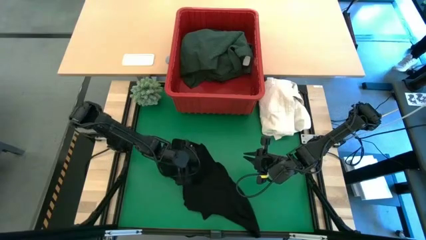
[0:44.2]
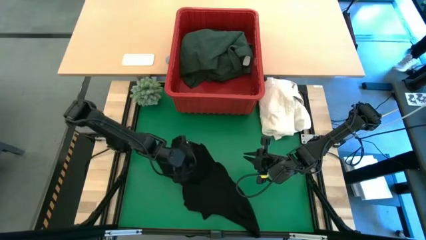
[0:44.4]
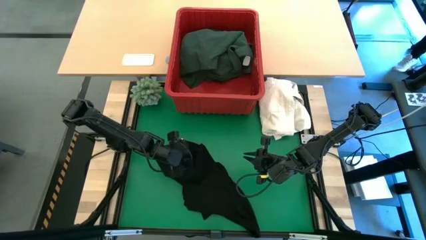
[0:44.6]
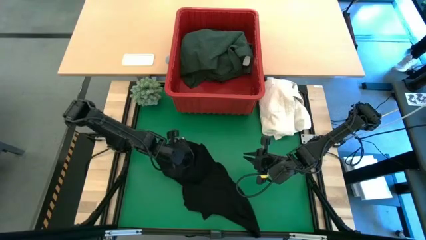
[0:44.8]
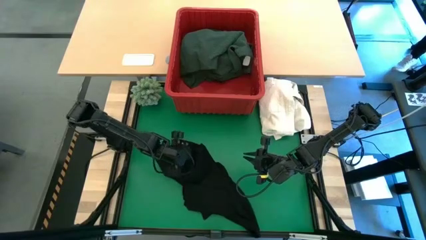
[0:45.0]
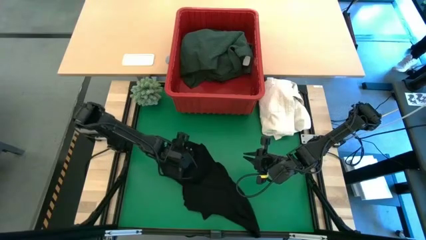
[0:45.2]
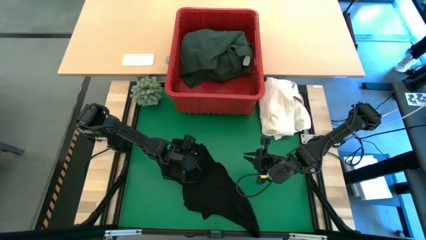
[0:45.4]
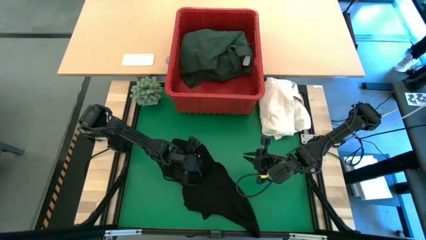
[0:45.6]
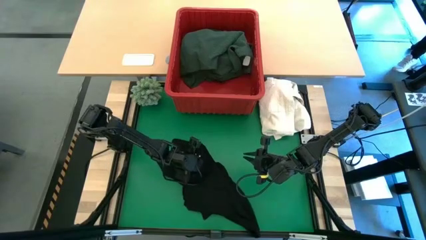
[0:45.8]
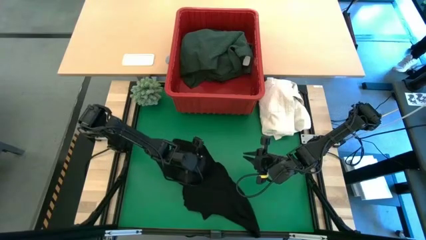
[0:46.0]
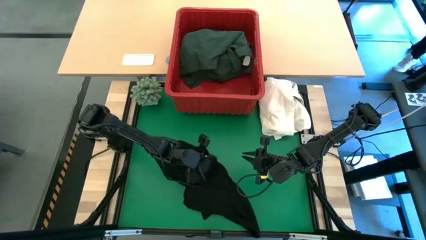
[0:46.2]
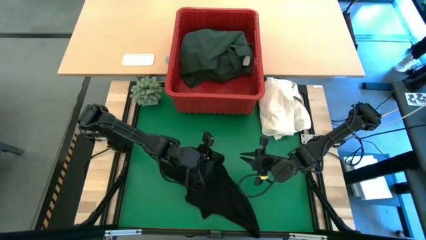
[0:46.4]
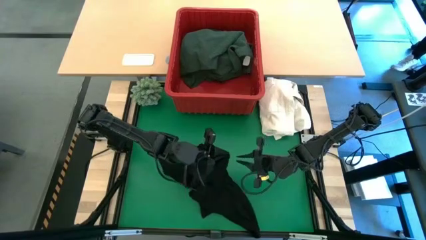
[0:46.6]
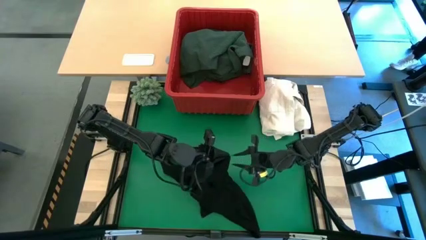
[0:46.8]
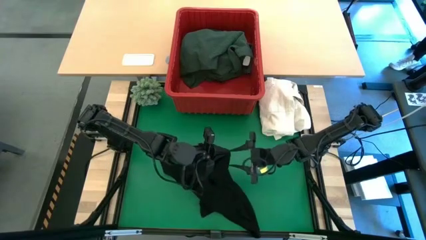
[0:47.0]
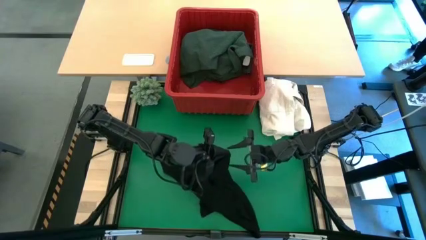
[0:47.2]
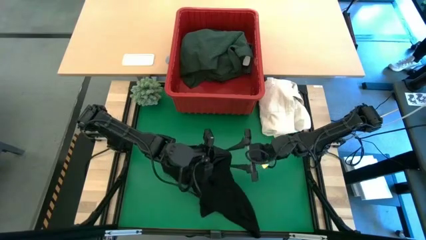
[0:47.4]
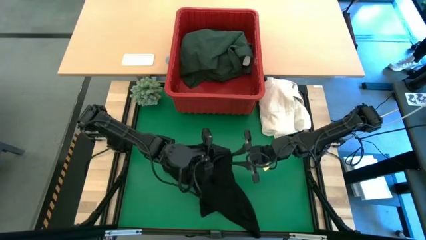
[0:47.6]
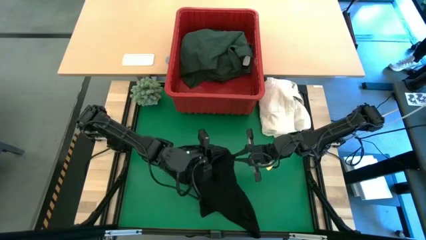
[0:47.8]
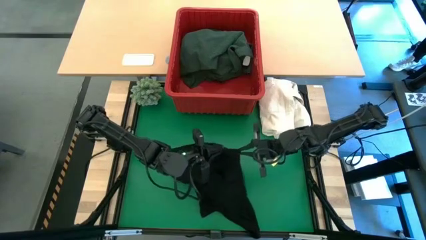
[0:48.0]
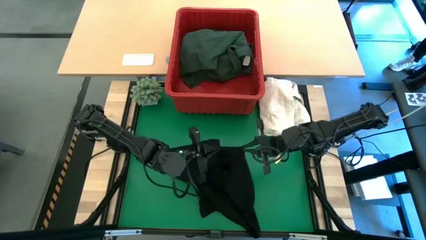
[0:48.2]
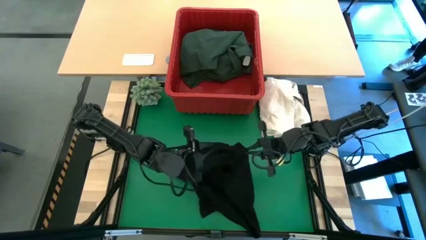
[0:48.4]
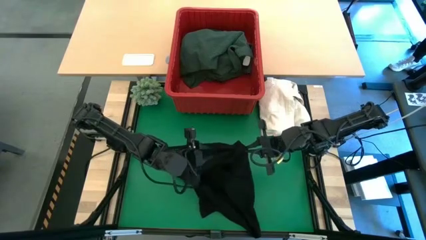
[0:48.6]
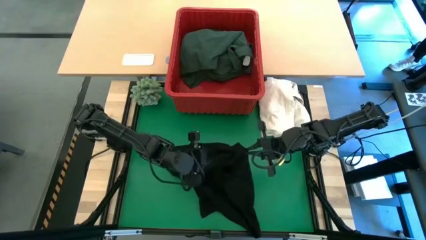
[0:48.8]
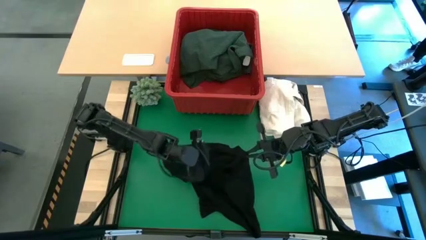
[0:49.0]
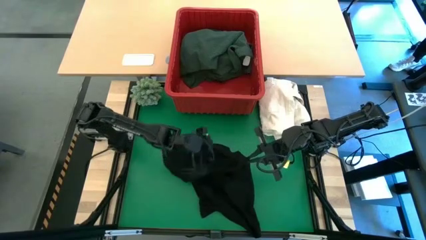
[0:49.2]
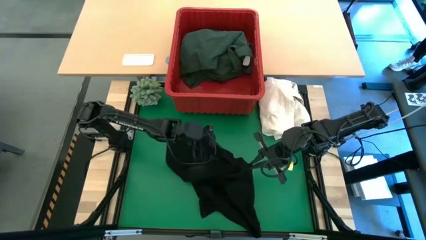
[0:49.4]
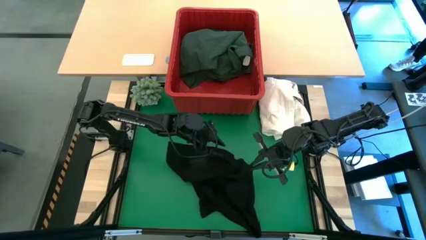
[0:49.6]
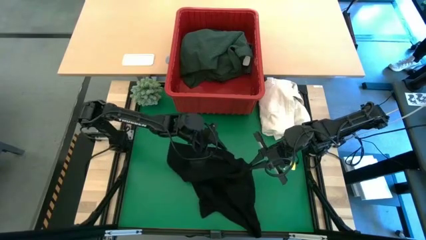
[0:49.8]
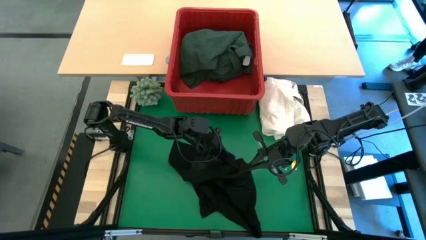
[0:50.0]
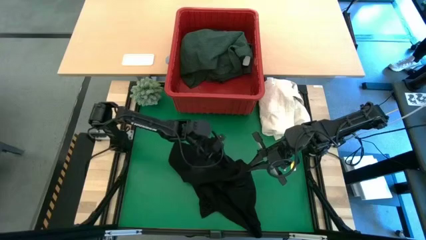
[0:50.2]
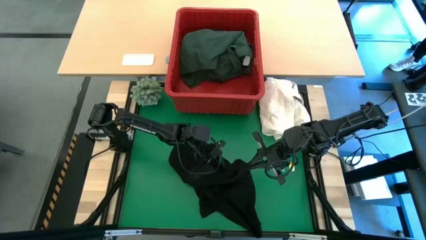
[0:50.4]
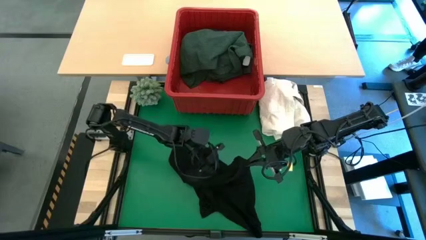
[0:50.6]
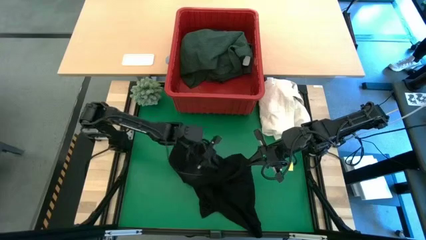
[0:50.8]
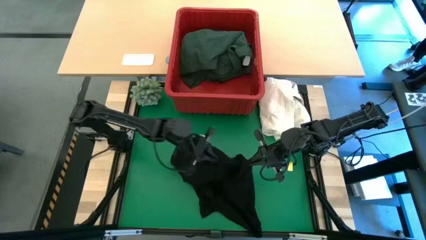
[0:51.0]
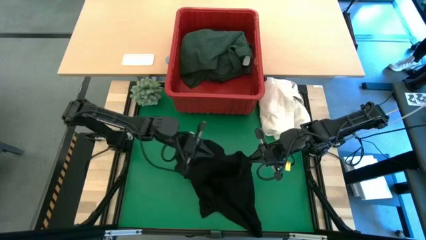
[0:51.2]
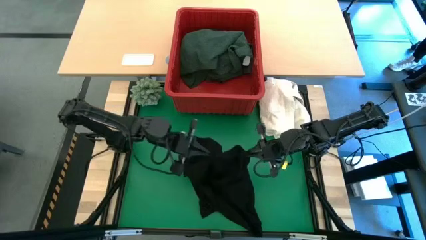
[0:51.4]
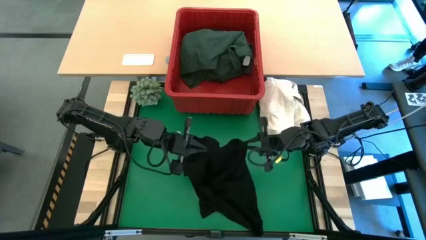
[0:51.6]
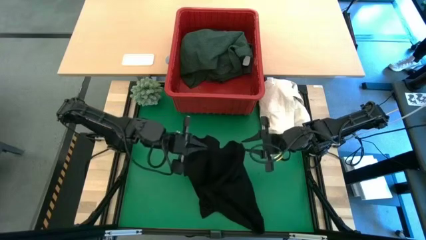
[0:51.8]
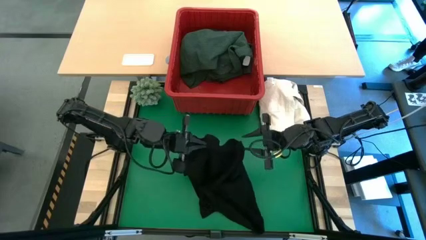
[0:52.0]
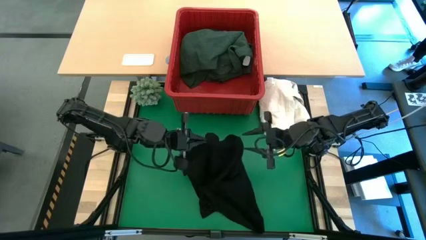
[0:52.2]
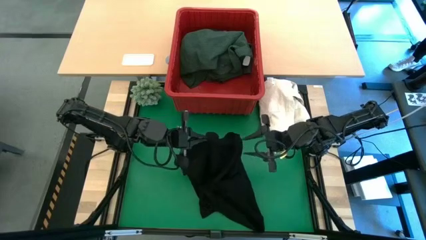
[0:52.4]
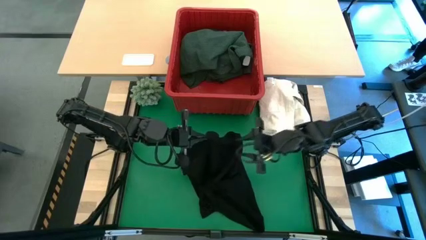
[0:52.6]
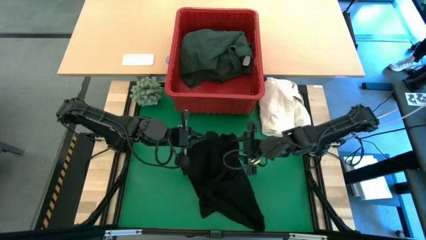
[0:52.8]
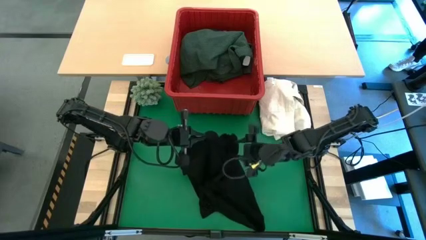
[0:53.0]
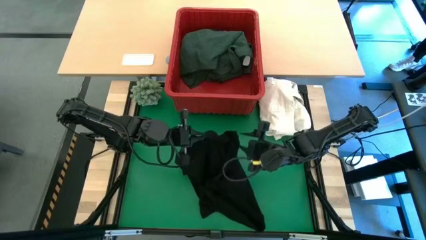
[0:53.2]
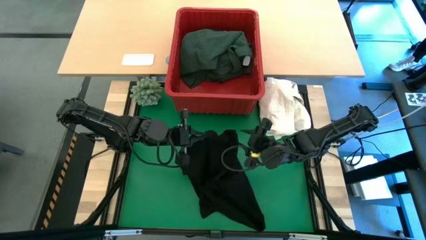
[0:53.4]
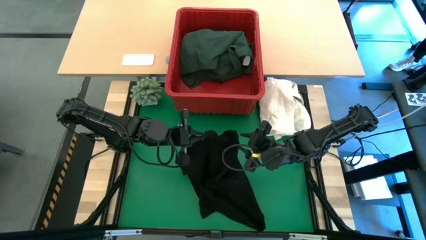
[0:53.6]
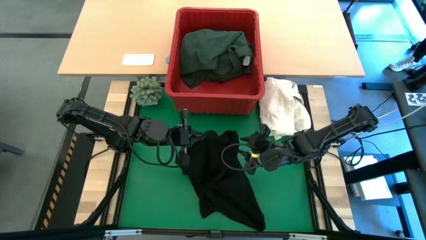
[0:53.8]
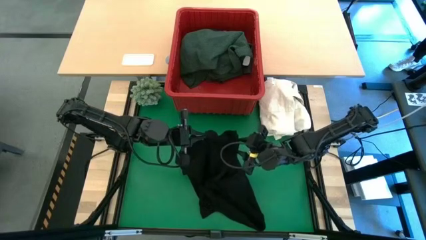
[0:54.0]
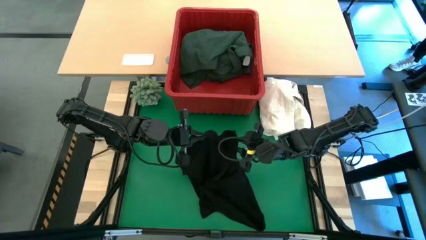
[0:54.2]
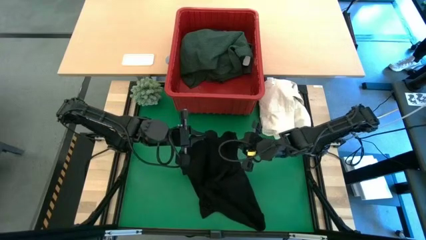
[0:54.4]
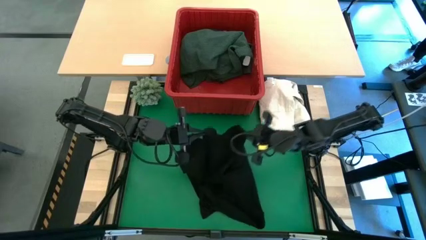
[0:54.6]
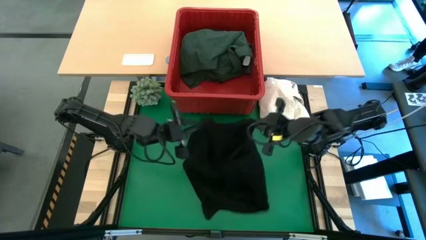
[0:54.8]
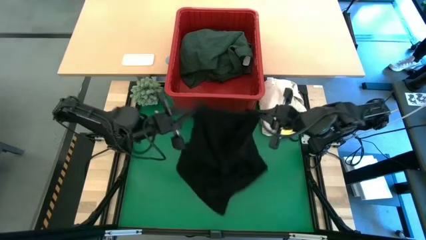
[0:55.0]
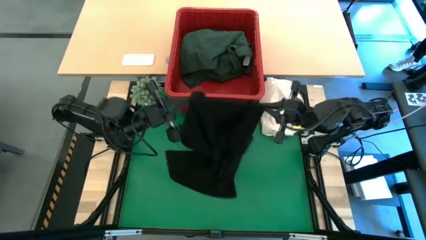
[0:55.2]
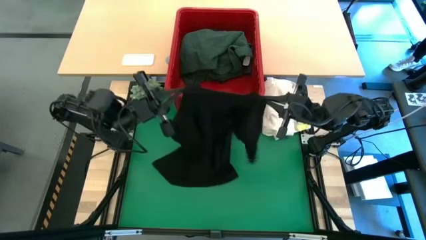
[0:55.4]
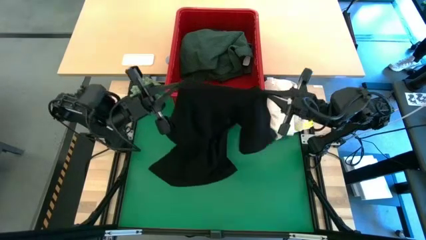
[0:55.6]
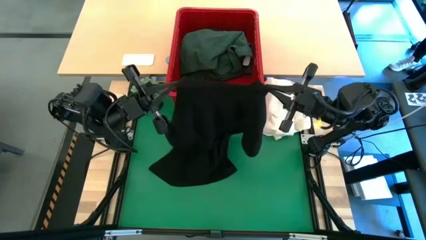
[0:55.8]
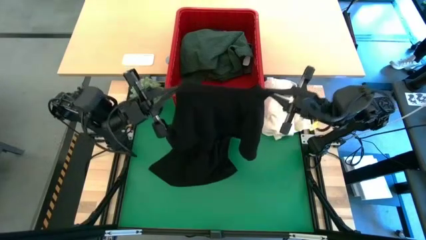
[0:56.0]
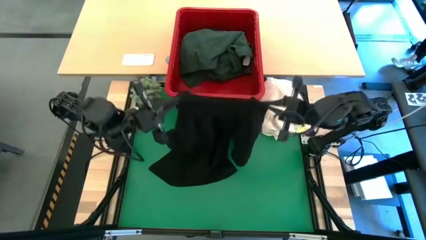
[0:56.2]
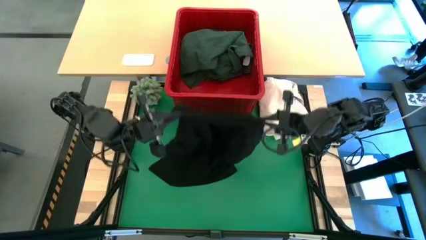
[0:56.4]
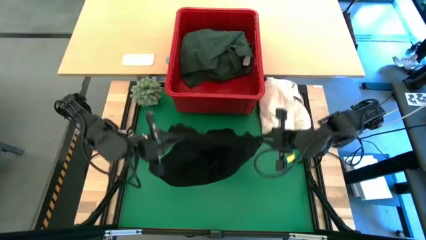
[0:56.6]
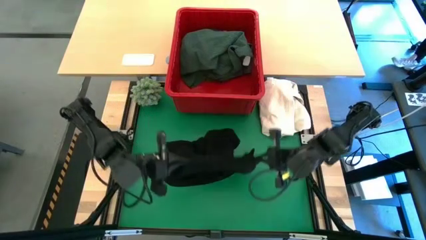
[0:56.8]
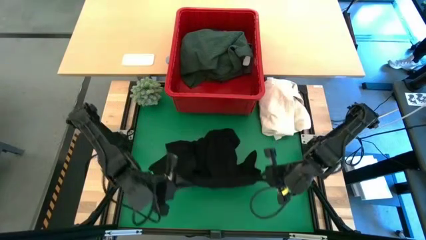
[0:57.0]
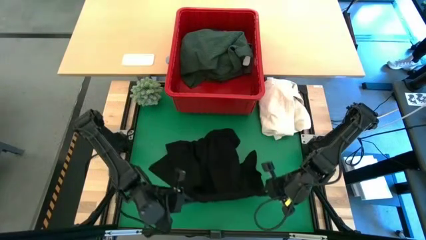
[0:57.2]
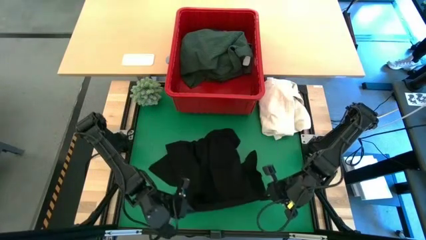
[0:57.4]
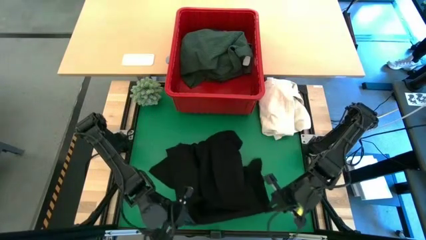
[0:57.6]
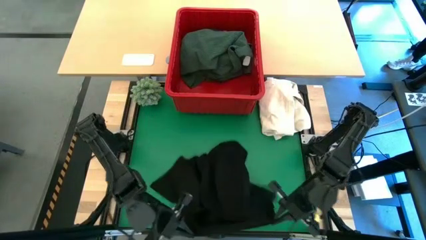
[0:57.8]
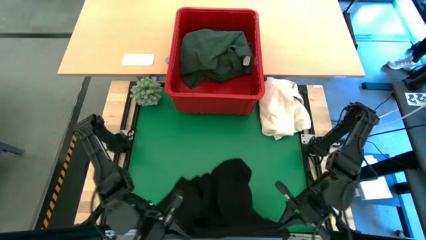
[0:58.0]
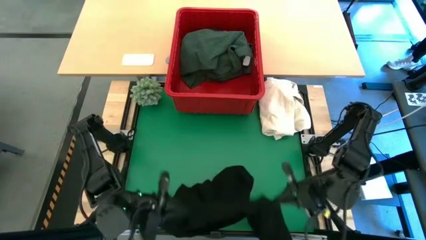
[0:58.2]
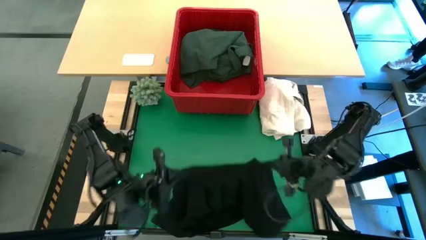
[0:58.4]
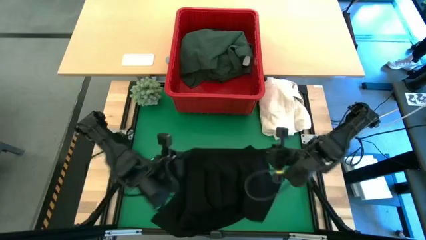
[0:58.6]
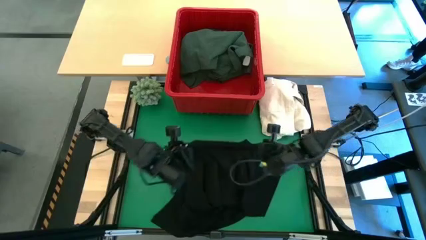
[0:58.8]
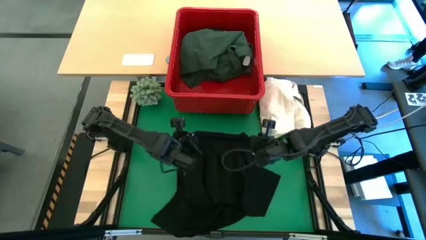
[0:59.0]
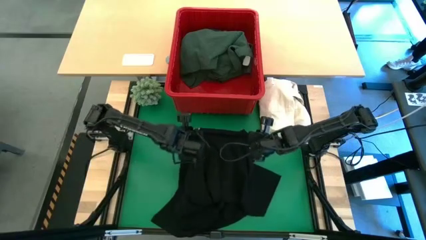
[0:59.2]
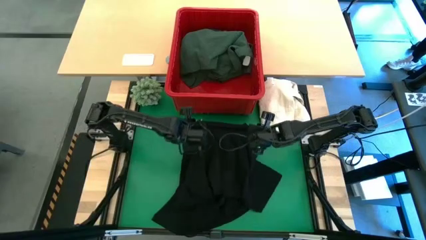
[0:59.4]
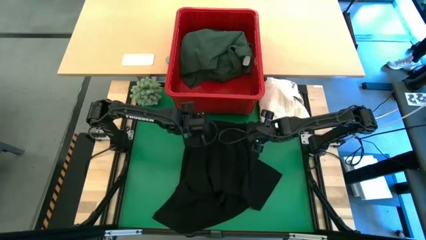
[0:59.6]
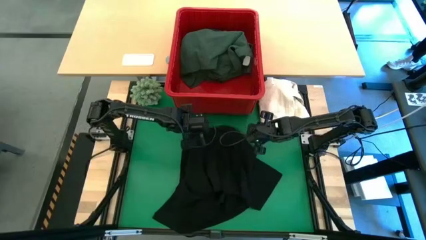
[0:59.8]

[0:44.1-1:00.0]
Task: Fold laundry
Fold the black shirt

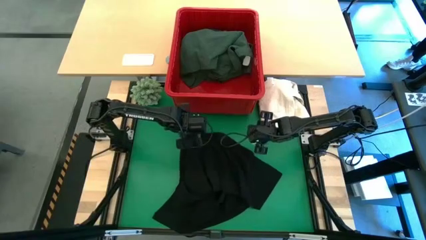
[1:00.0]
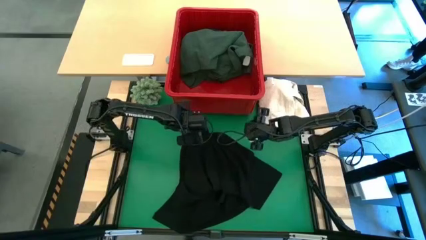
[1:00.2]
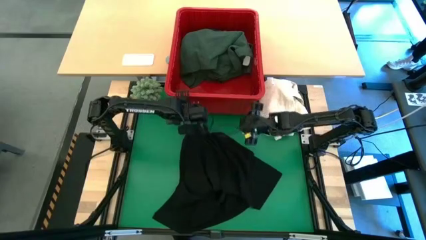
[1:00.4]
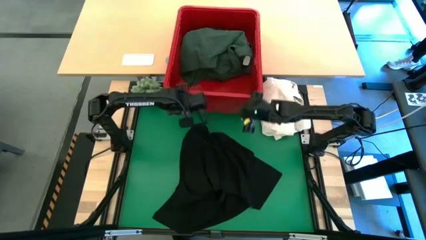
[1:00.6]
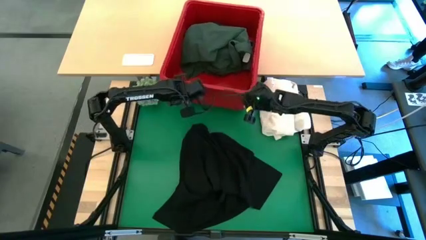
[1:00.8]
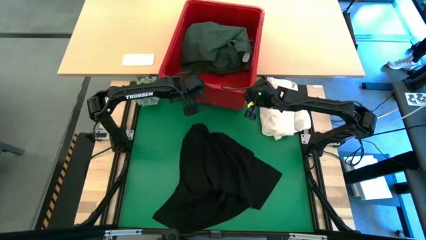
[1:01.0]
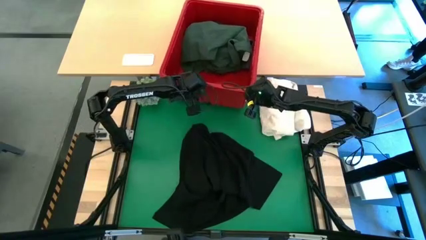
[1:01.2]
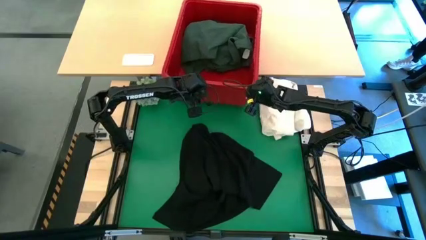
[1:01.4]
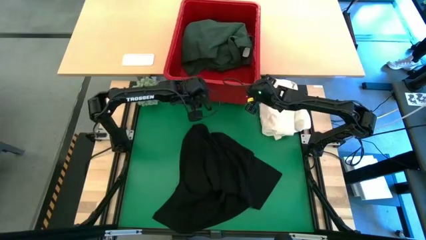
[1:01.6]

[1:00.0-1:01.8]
Adjust the red bin
